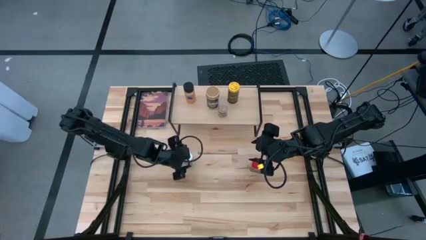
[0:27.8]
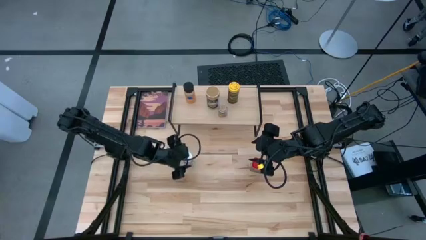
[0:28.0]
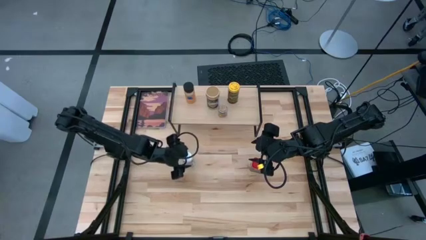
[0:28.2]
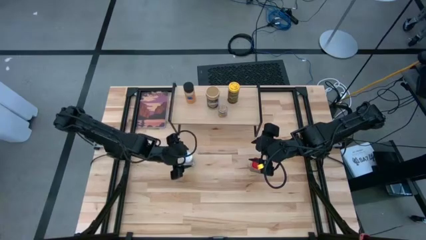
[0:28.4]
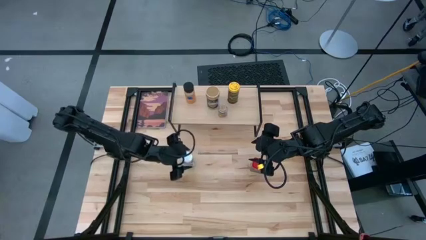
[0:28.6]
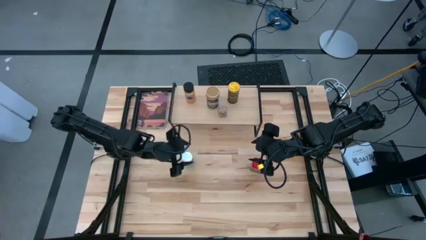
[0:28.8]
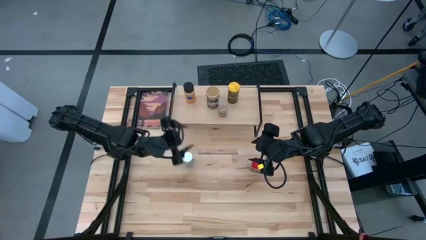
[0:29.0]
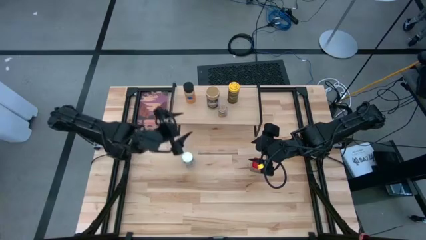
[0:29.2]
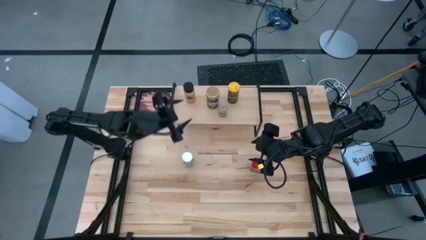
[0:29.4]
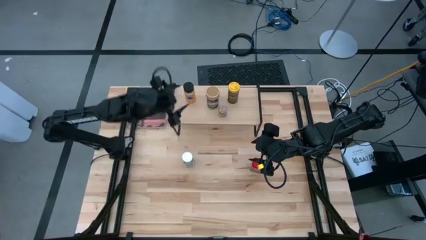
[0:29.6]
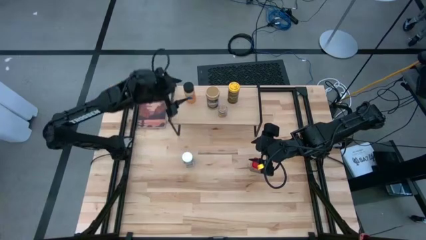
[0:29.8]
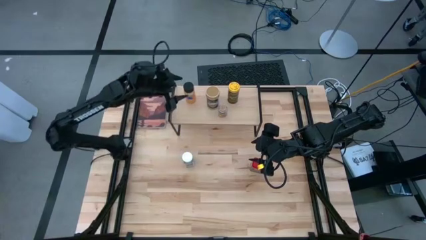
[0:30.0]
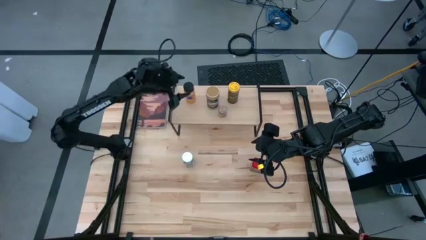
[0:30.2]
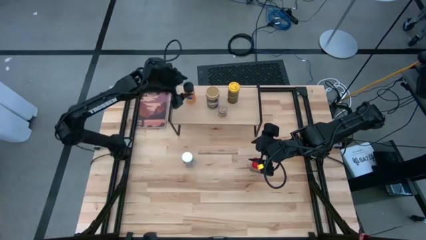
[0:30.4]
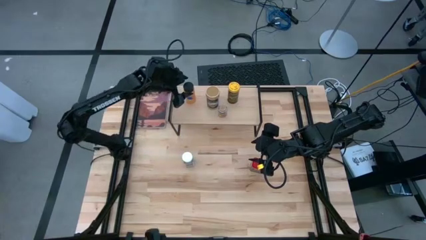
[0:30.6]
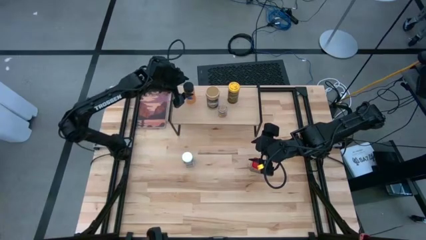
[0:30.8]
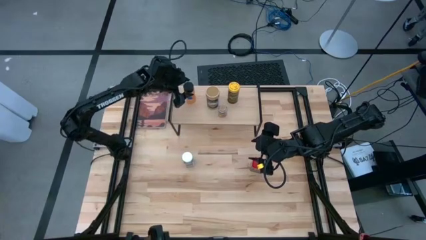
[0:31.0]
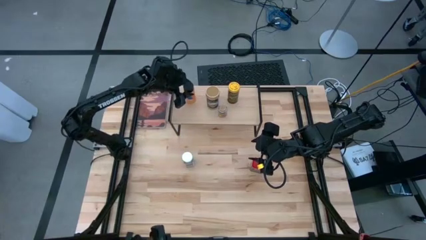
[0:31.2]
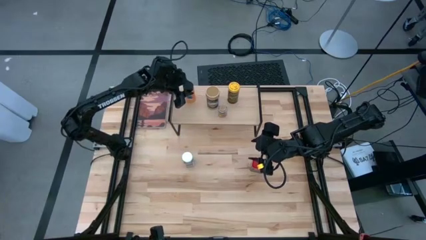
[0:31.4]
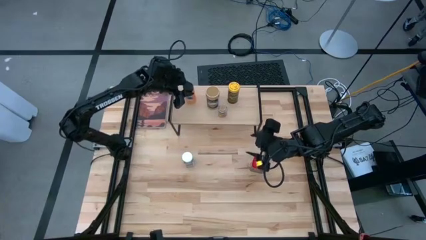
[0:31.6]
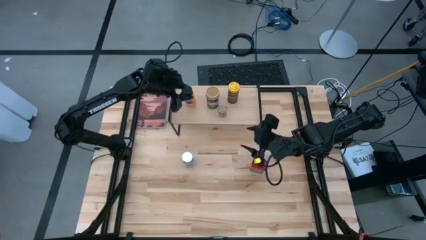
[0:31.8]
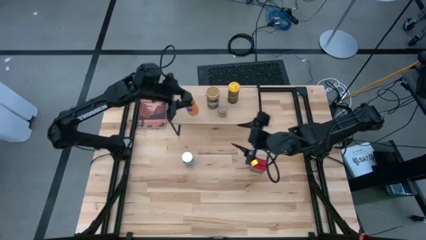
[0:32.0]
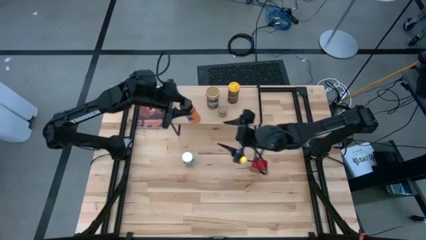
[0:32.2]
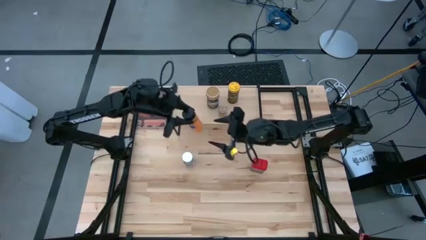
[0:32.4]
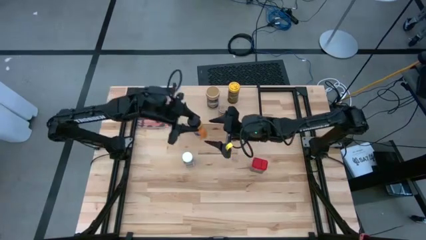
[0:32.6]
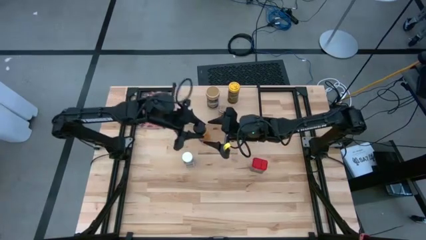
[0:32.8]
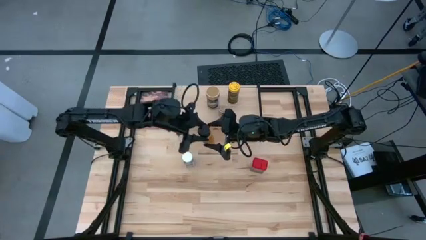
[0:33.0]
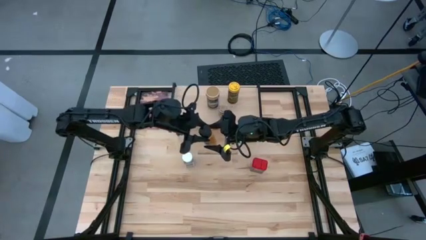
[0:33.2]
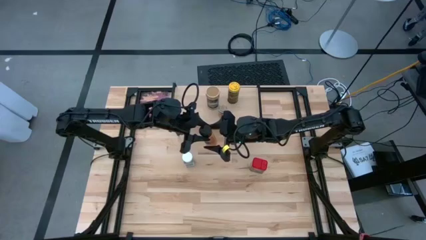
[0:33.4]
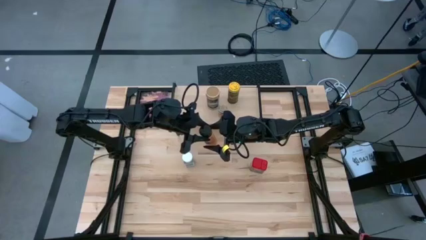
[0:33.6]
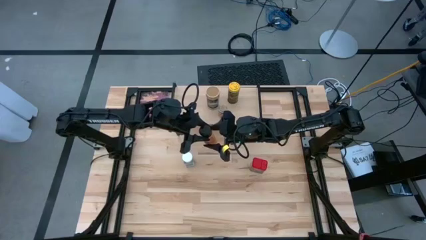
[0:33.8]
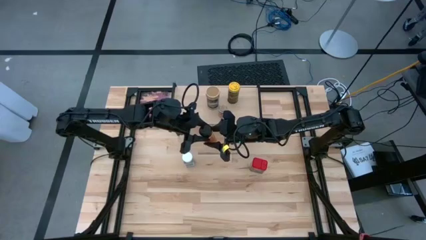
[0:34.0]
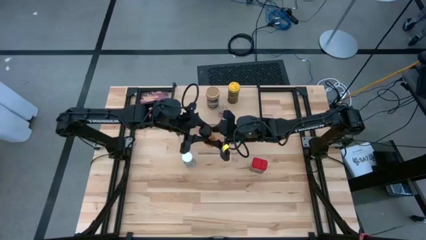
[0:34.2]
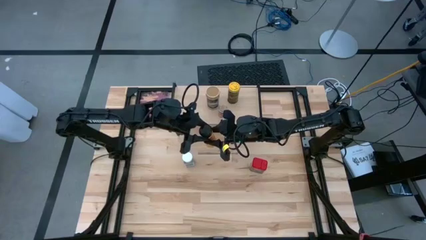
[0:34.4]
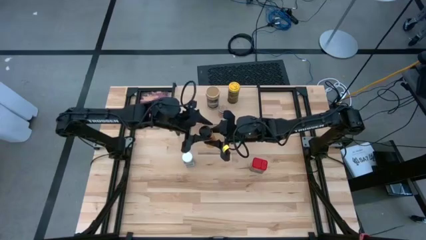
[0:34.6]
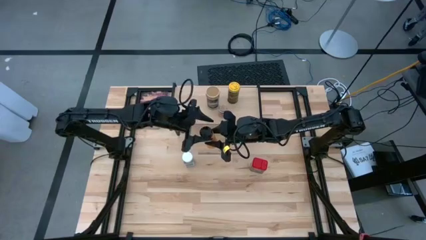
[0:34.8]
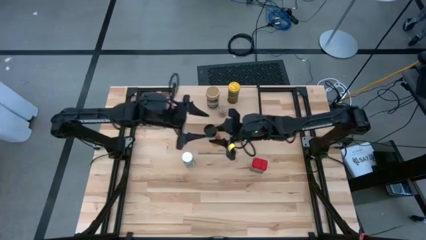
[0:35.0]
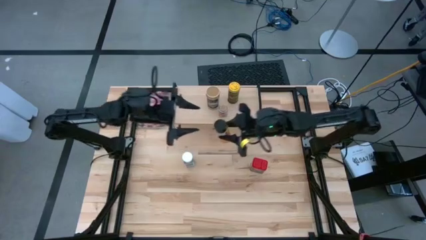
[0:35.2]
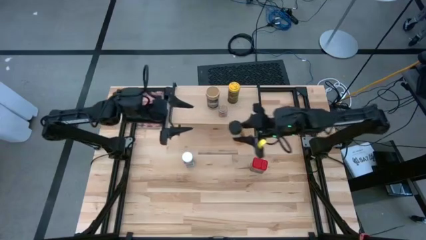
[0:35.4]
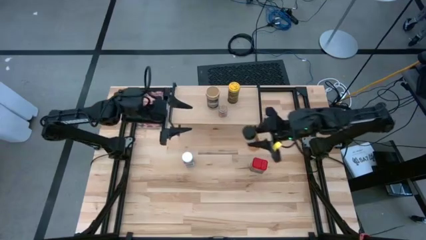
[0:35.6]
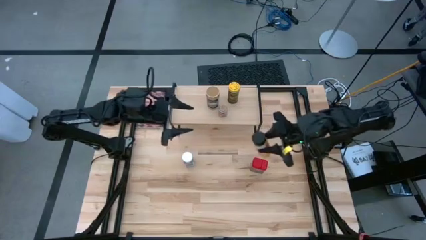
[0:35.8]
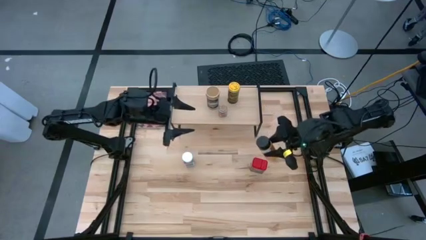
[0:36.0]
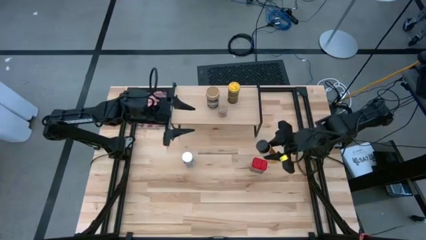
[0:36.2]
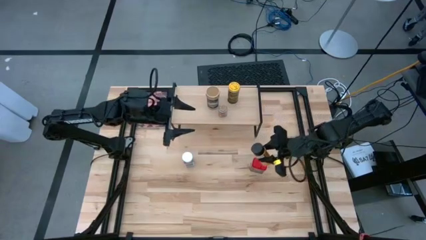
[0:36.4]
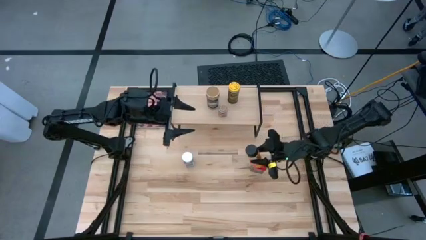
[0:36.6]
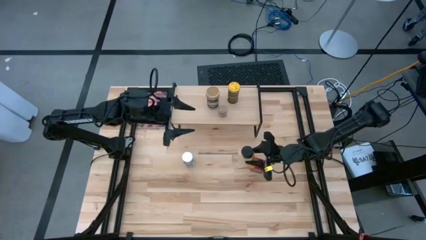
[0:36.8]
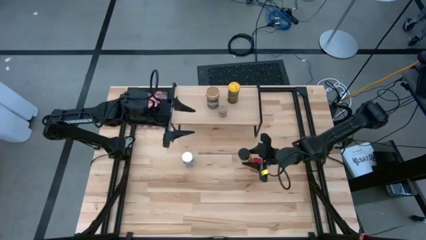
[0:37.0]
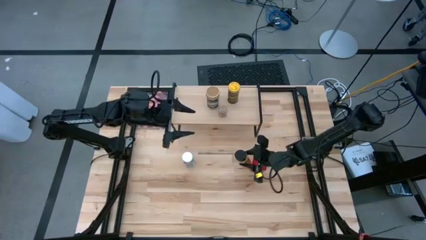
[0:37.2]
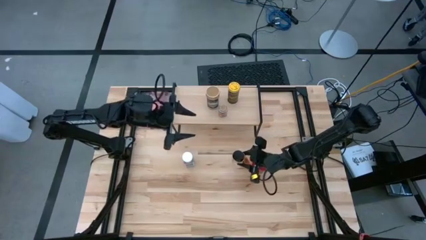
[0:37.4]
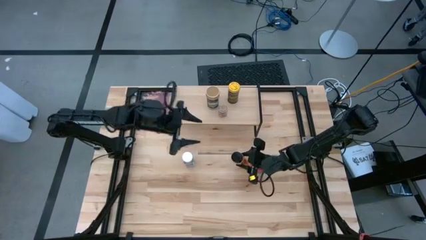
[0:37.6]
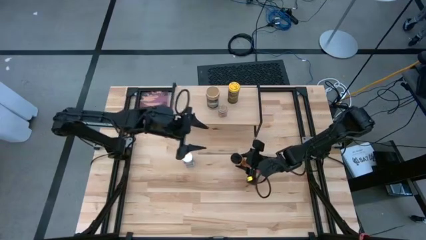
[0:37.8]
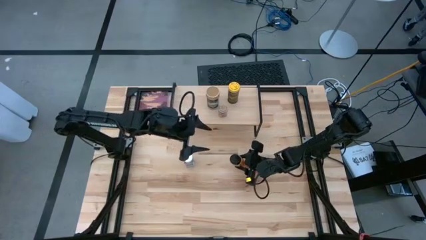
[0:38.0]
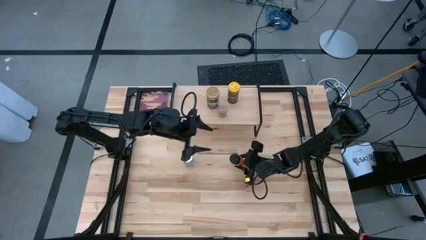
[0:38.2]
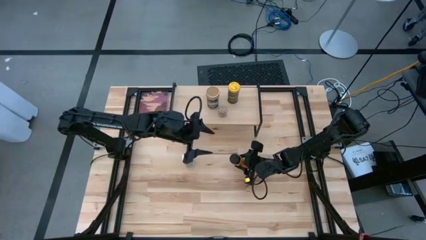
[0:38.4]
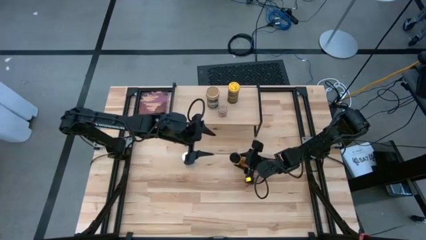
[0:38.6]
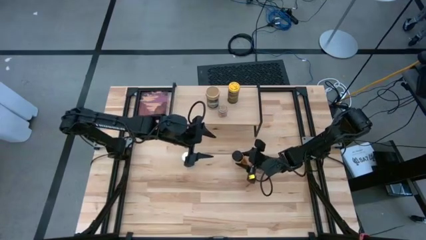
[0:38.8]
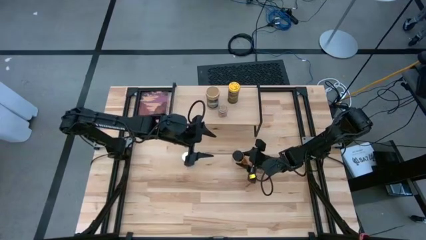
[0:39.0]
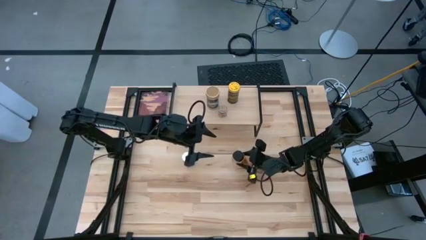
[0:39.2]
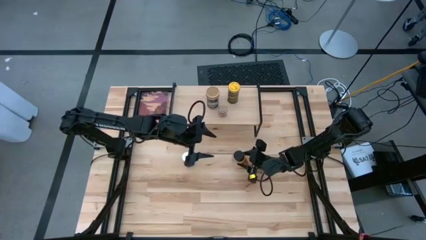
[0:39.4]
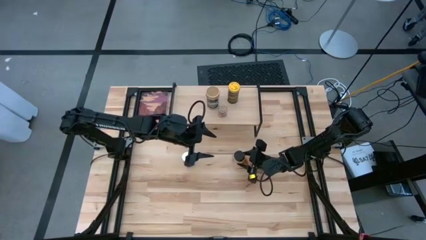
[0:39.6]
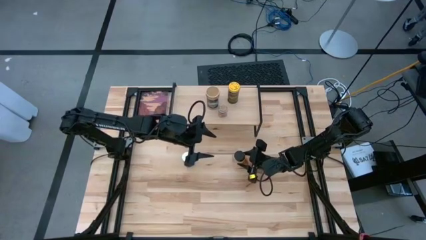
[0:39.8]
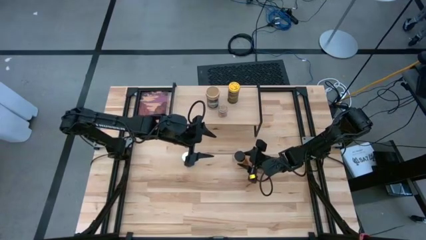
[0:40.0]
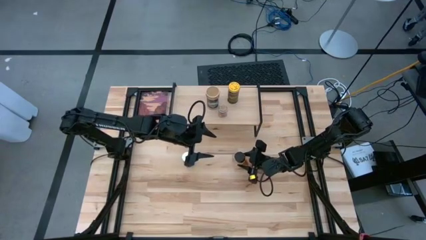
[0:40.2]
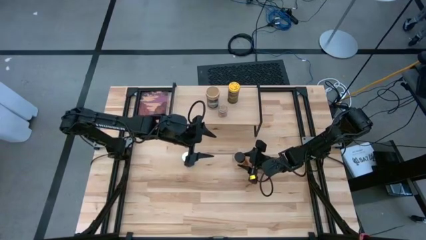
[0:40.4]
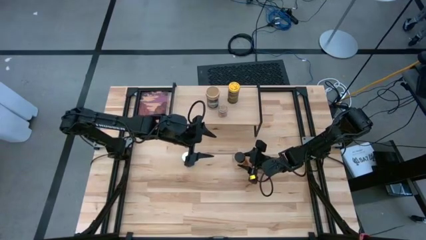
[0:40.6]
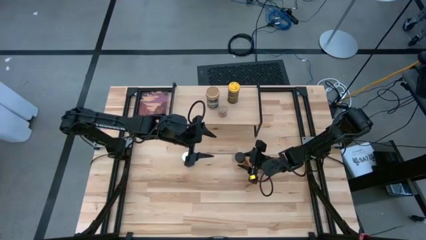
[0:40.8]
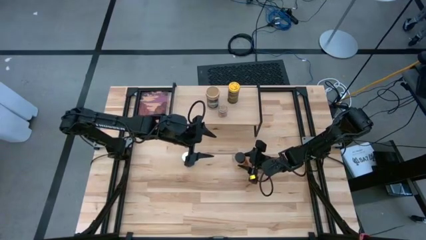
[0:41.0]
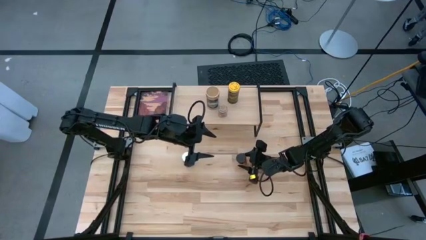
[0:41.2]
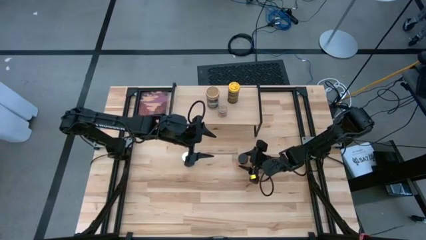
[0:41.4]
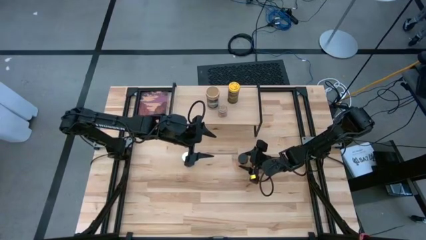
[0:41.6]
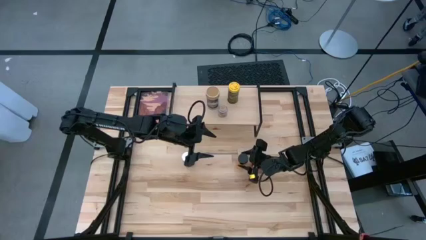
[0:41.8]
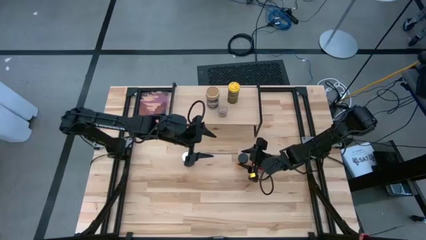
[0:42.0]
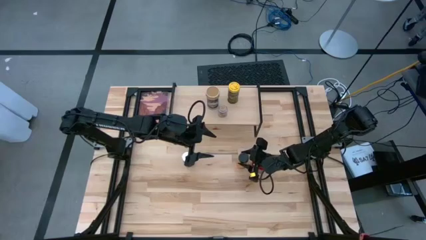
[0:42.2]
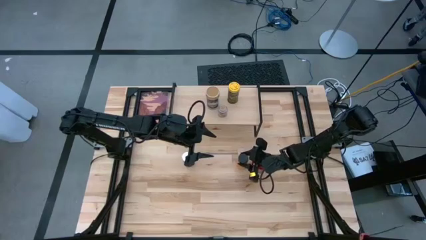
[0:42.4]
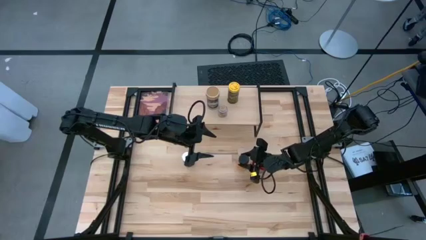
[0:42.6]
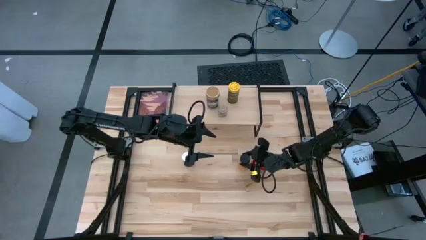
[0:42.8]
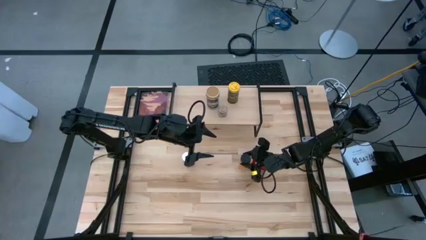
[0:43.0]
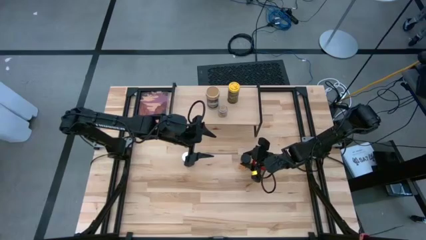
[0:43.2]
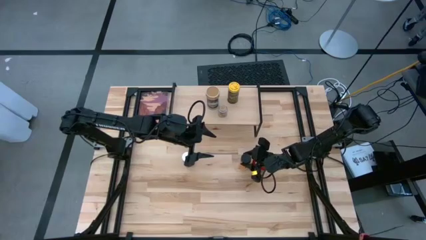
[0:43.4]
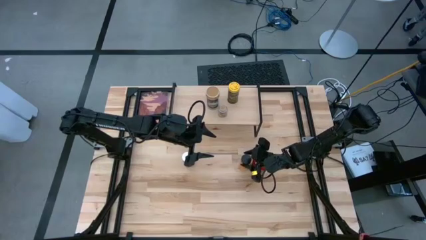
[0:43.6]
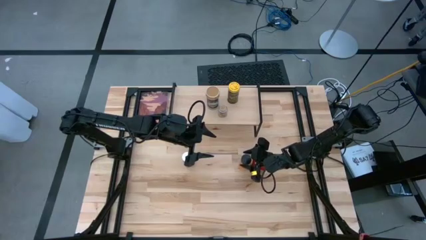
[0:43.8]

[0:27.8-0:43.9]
Task: Shelf spices
Remove the orange seasoning bottle from the shelf
